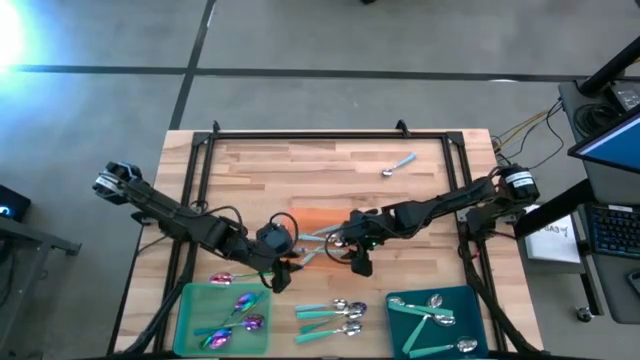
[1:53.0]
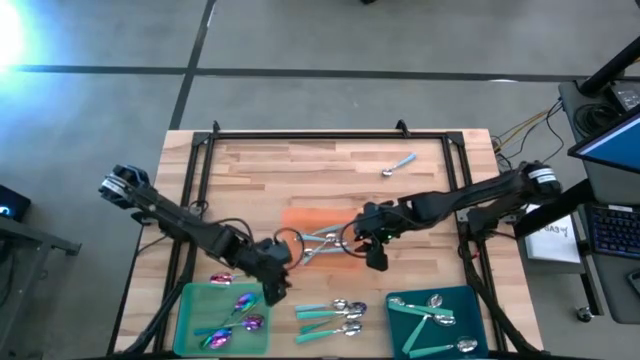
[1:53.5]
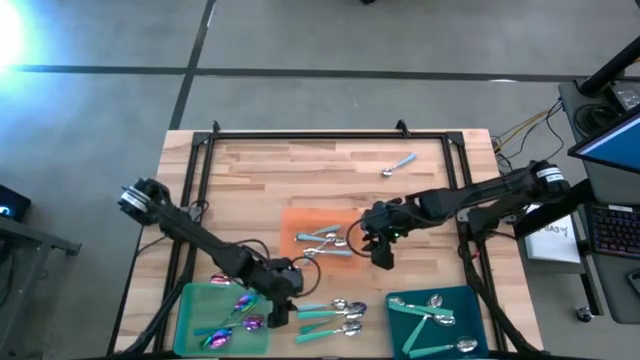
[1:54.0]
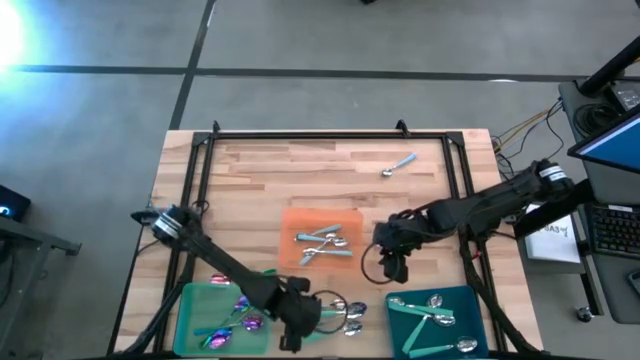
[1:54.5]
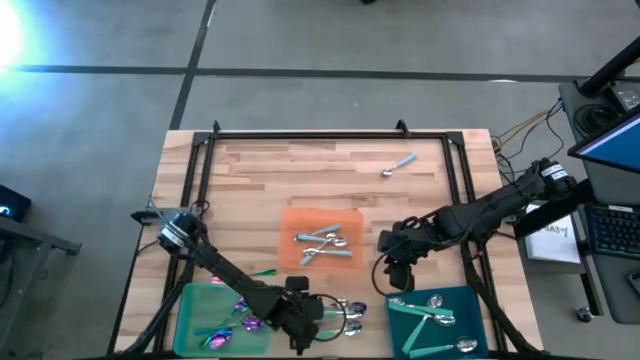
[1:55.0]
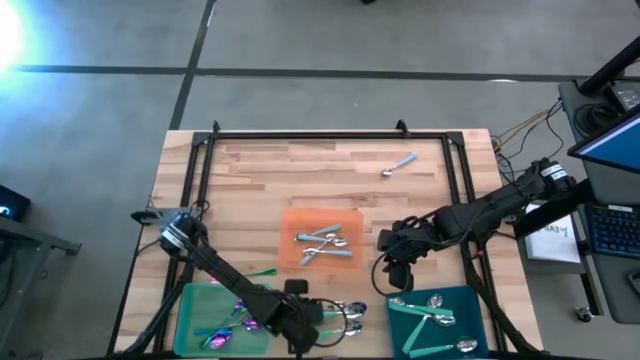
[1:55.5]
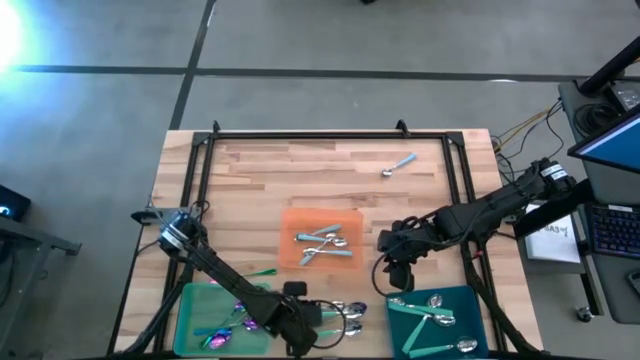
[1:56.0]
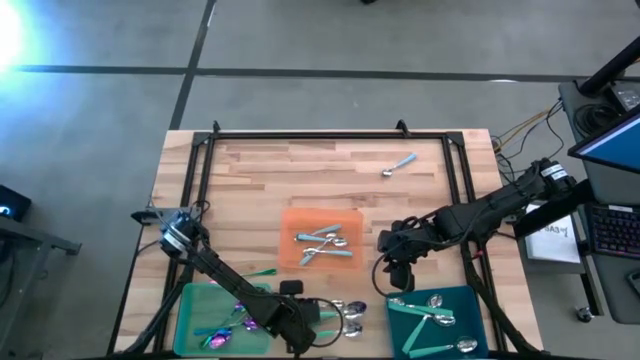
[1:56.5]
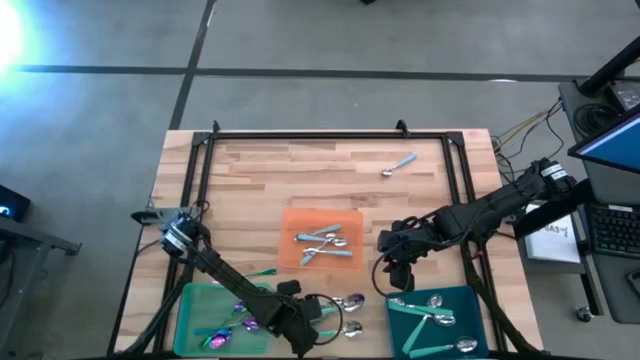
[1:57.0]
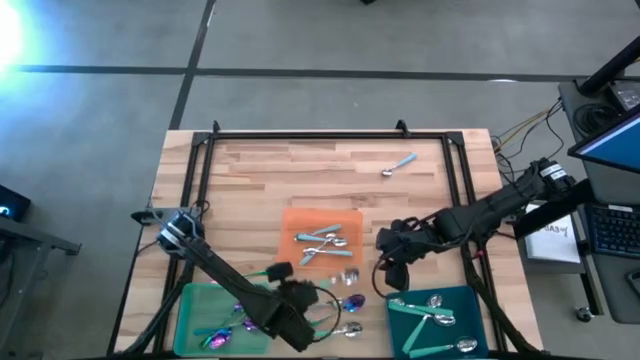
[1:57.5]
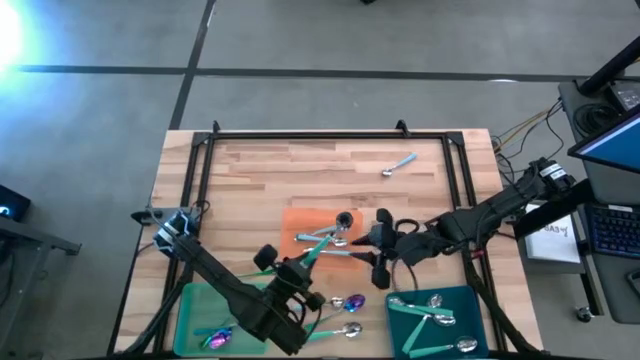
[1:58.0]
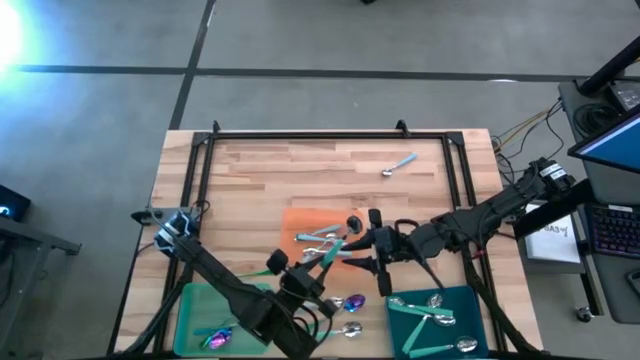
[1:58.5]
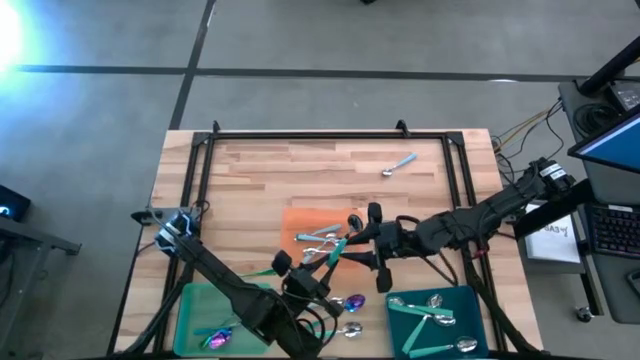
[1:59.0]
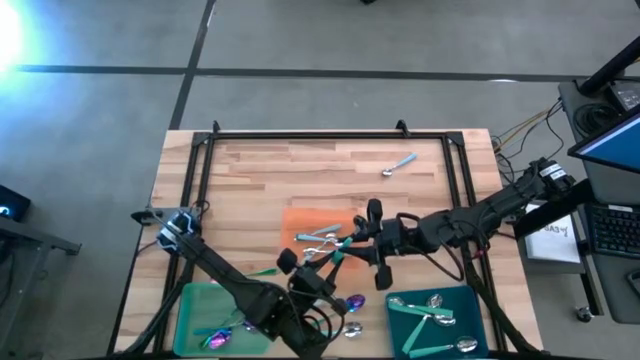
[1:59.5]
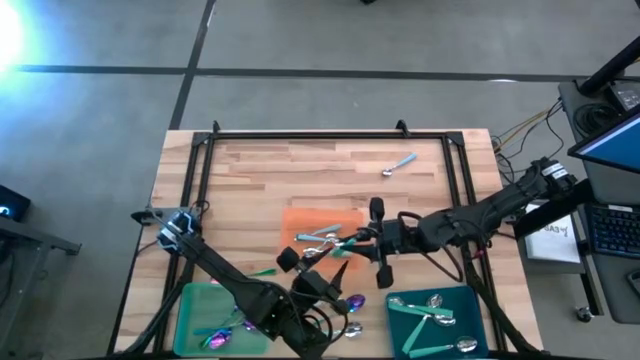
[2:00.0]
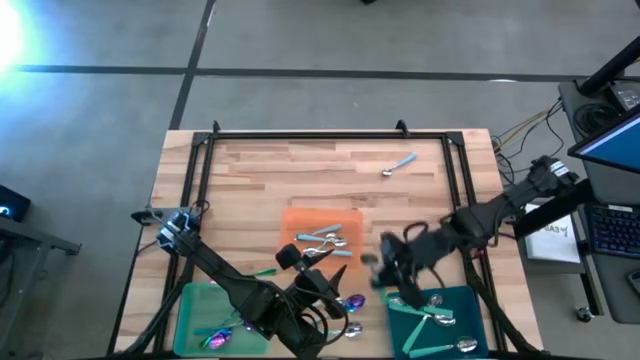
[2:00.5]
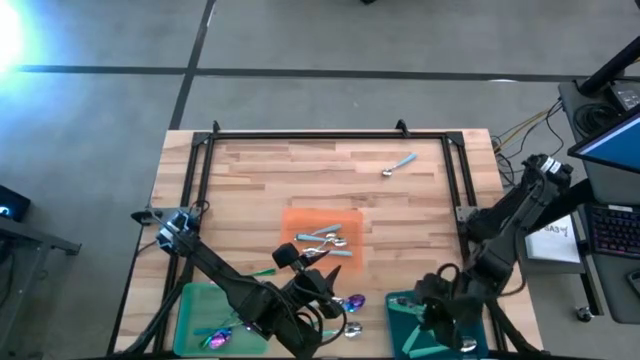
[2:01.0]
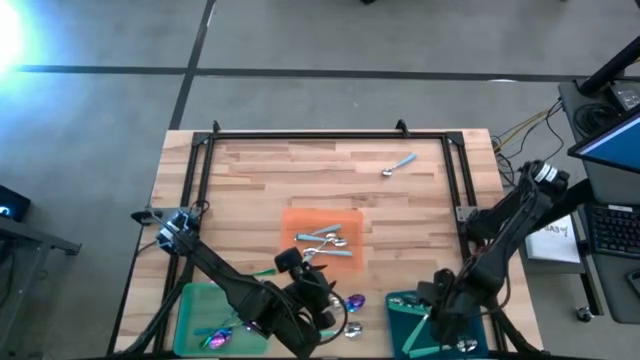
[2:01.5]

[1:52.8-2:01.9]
Task: Sort silverware by color (type)
Put the green spoon into the blue bin

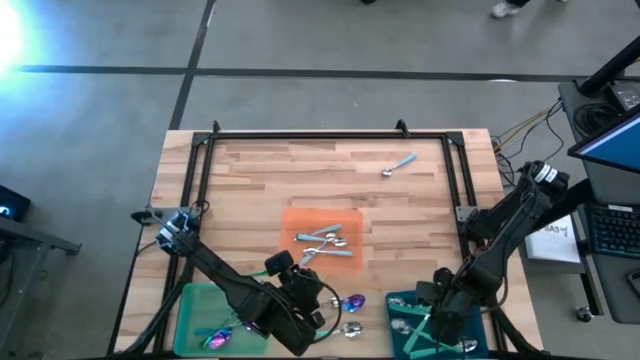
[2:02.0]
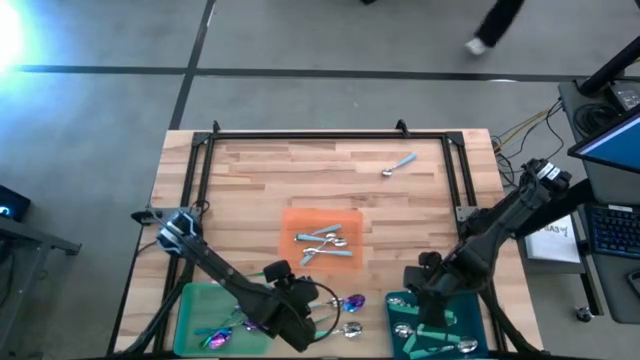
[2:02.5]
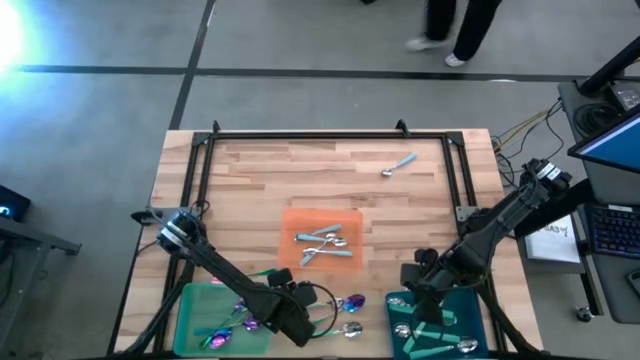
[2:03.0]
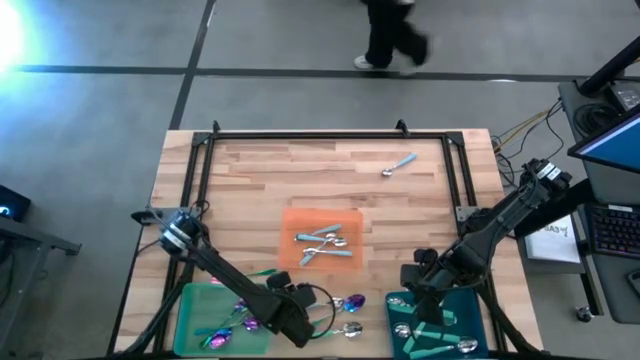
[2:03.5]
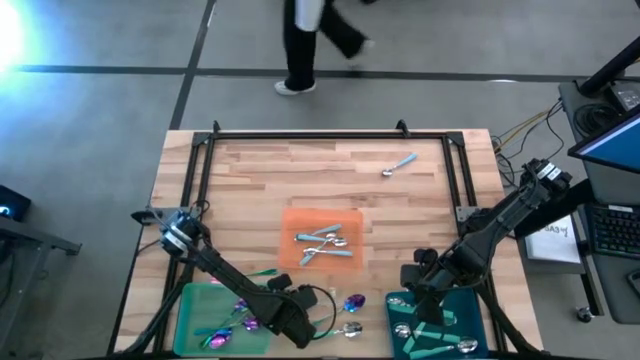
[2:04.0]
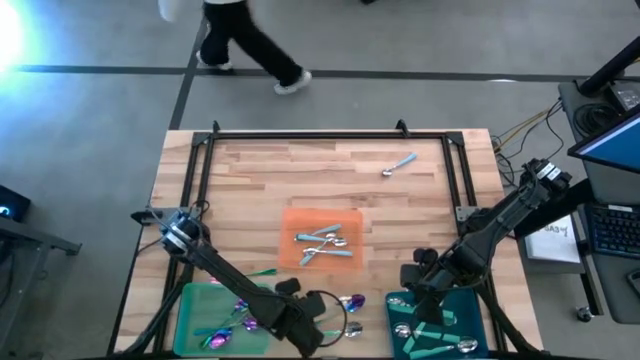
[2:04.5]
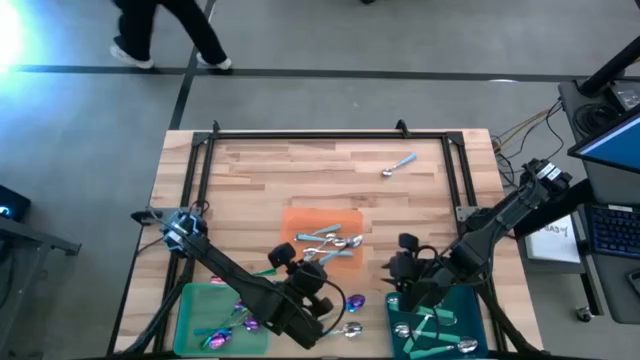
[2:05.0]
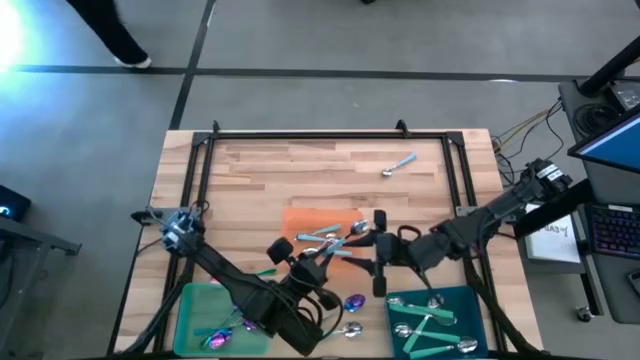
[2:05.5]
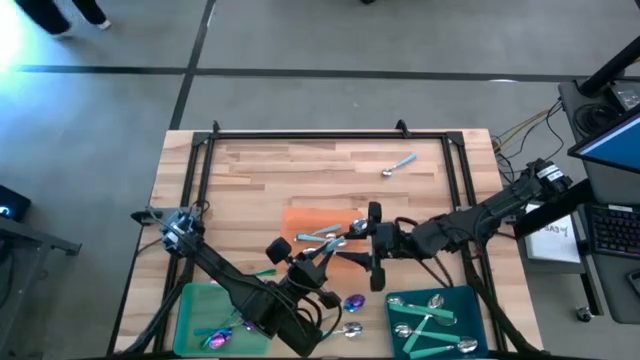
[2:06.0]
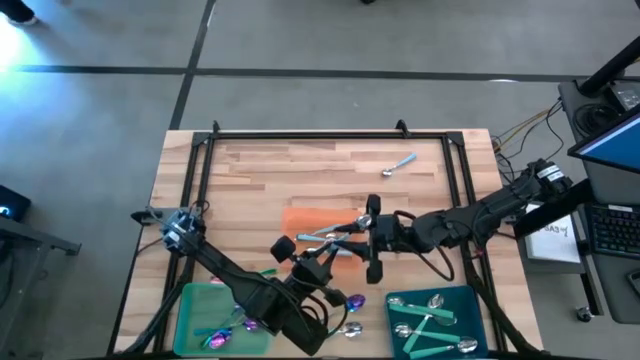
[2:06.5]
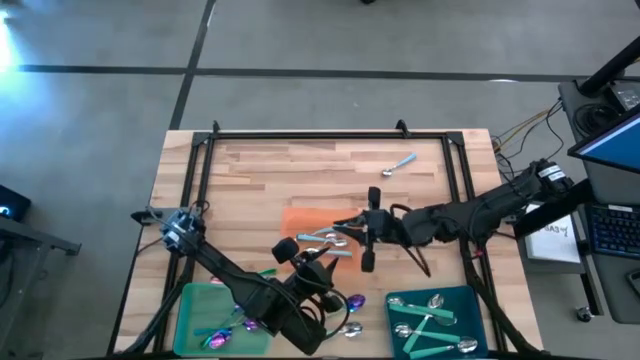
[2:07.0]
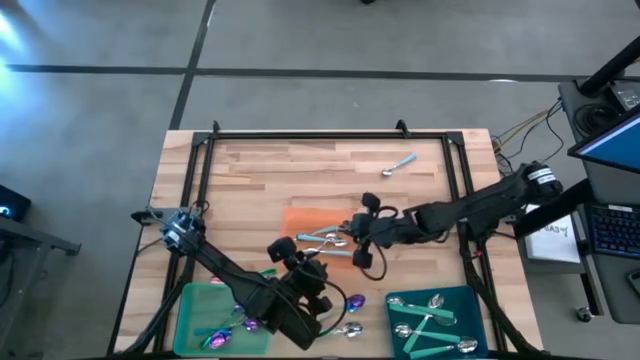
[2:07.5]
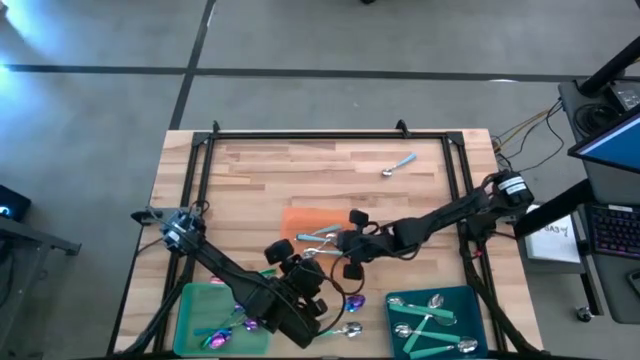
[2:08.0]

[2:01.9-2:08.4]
Put the blue spoon into the orange bin

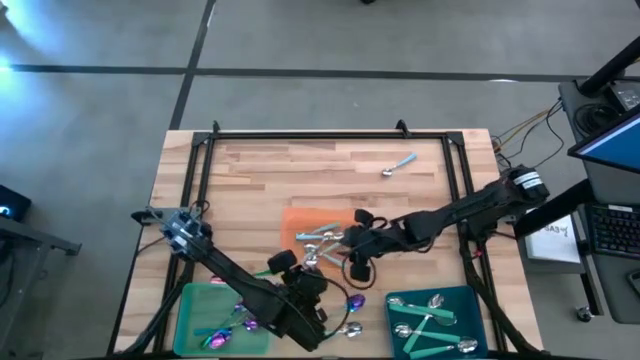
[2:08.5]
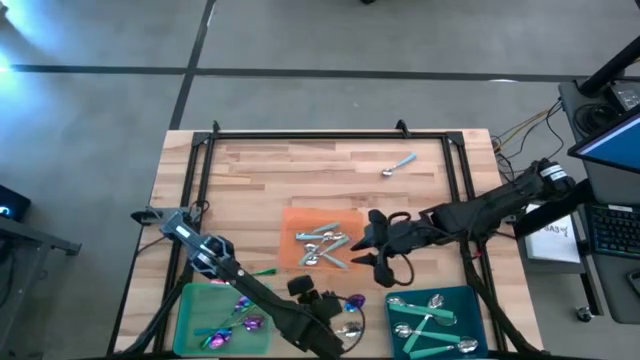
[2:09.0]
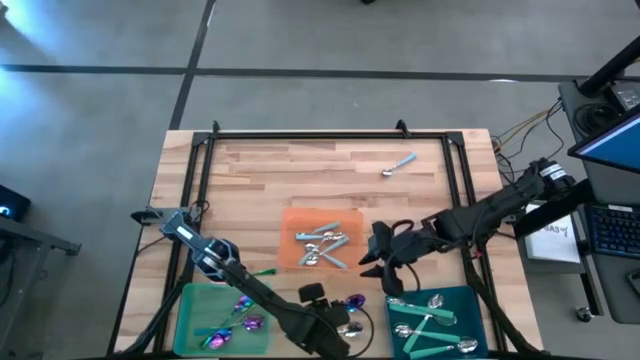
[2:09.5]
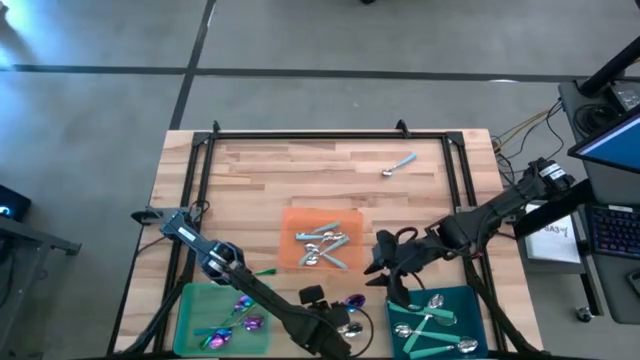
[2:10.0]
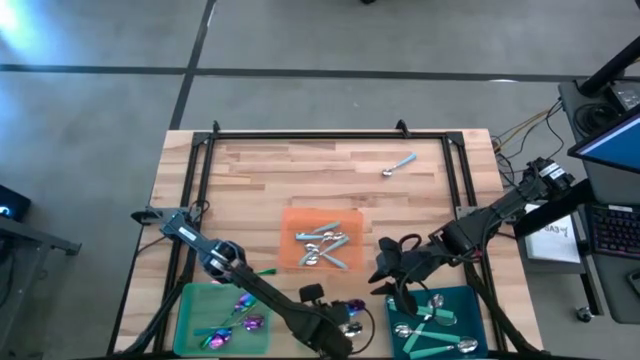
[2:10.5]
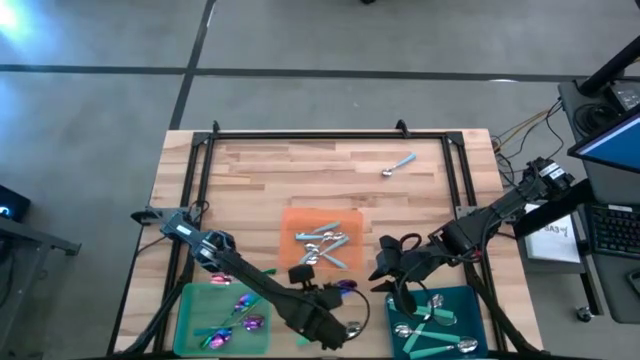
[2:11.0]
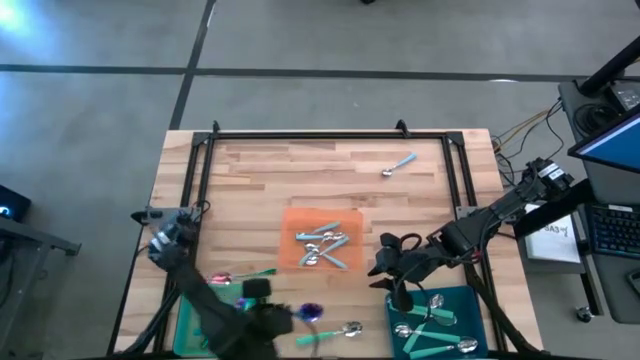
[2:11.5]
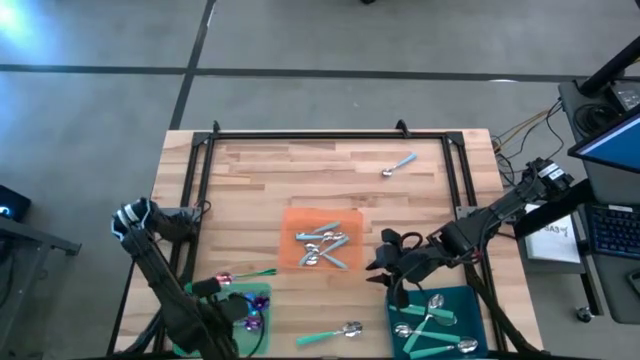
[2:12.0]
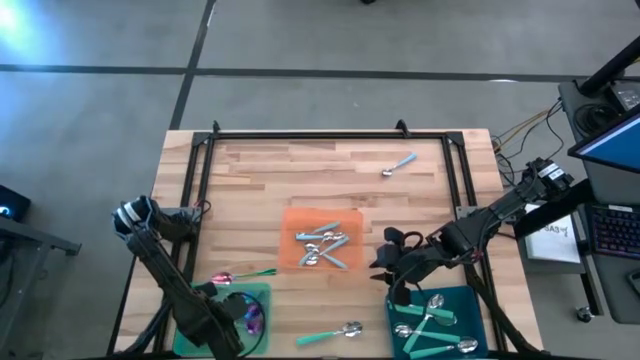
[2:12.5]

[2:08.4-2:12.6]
Put the violet spoon into the green bin

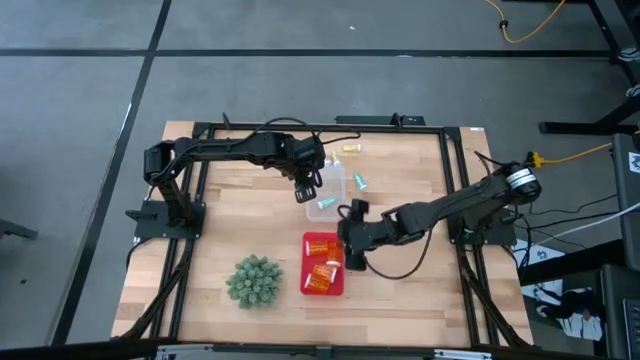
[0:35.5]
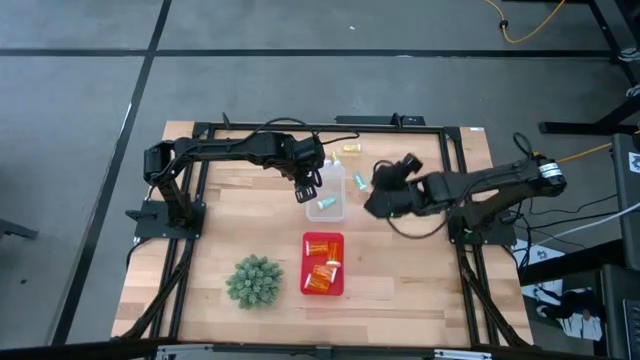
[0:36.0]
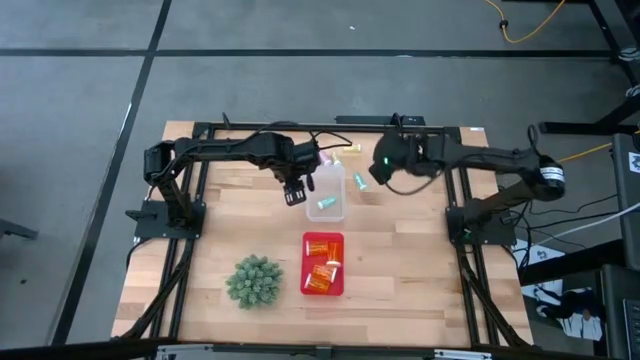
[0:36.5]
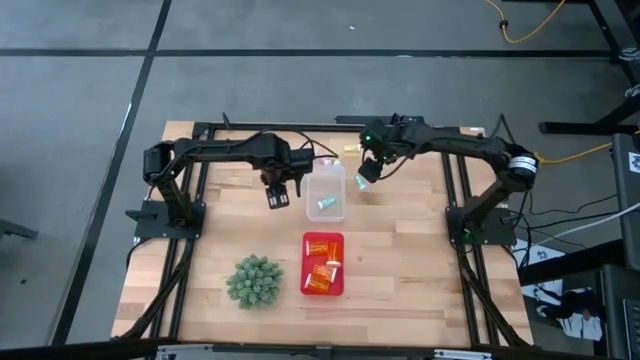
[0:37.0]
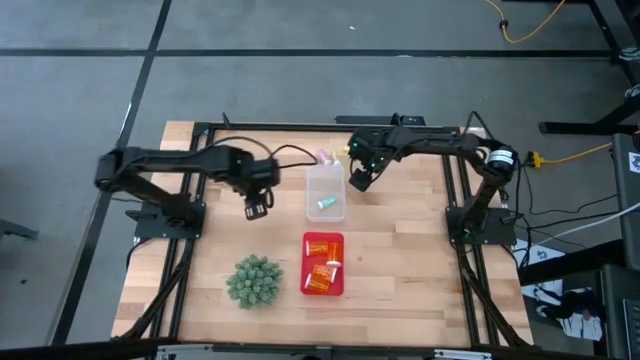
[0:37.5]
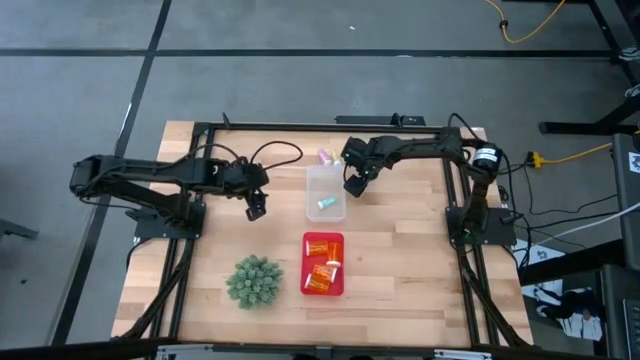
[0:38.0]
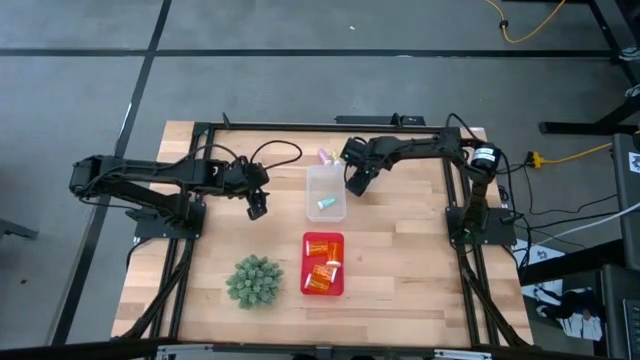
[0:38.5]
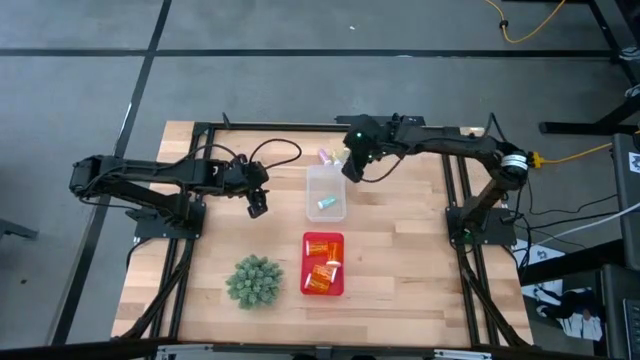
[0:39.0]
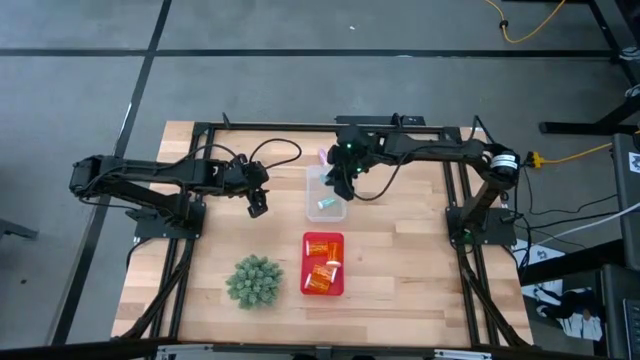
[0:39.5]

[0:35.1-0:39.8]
Task: Pick and place medicine bottles into bin by pill shape (circle, oval)
Put the small blue pill bottle into the transparent bin
